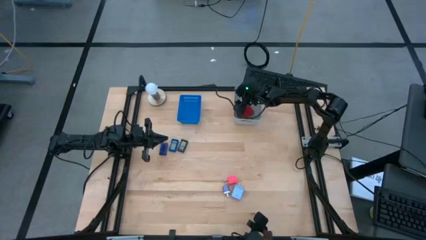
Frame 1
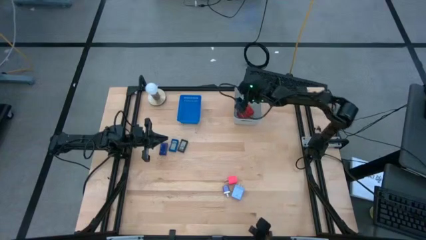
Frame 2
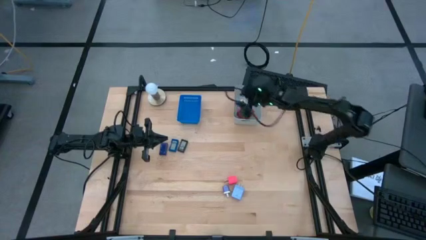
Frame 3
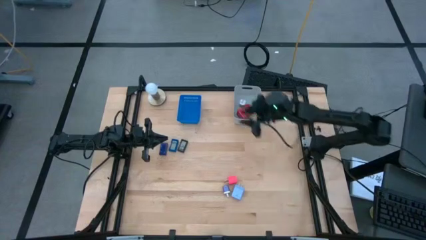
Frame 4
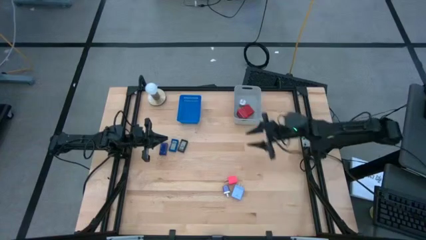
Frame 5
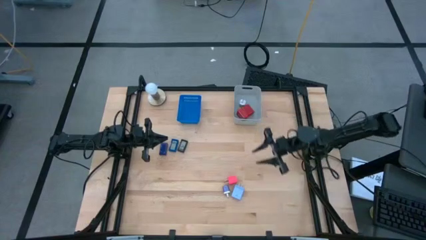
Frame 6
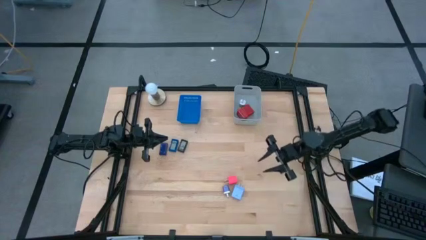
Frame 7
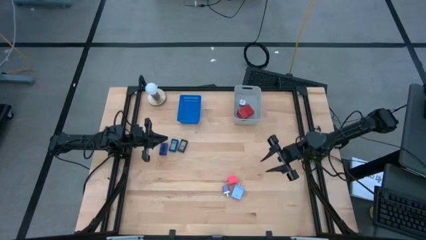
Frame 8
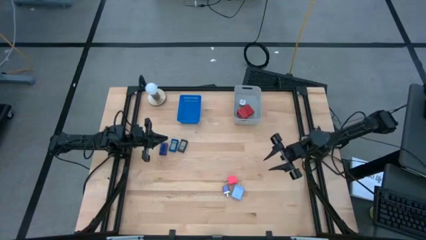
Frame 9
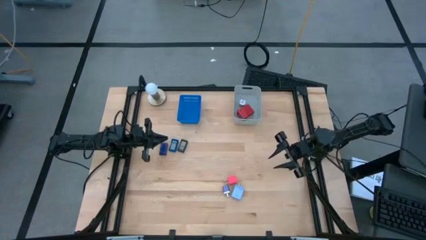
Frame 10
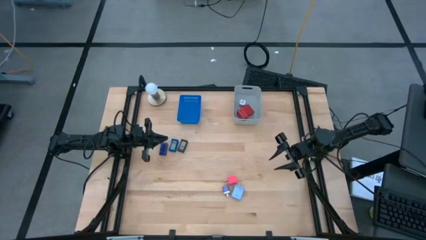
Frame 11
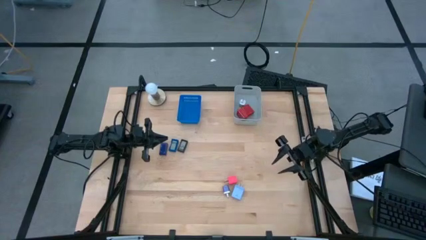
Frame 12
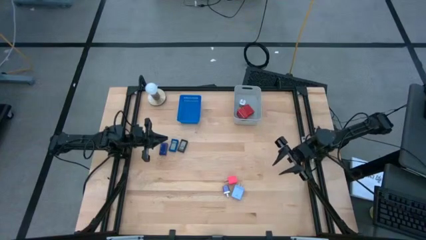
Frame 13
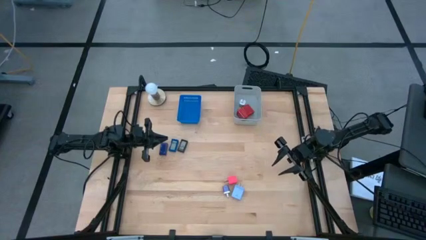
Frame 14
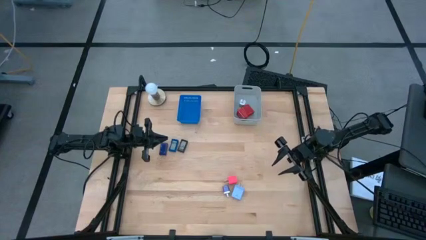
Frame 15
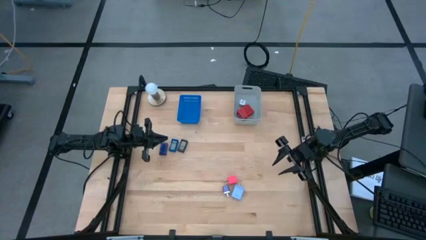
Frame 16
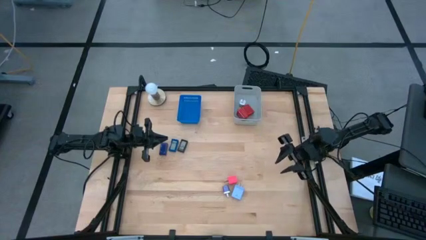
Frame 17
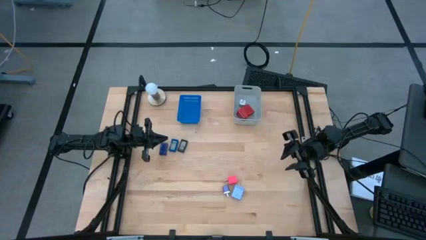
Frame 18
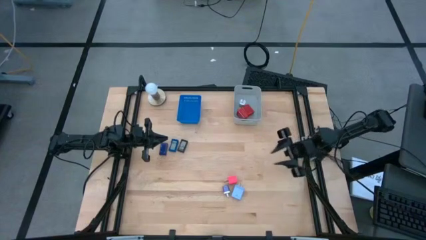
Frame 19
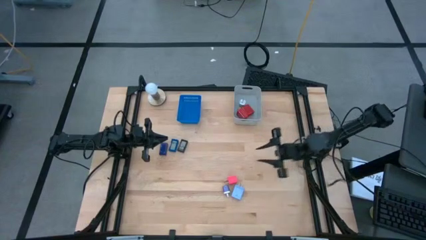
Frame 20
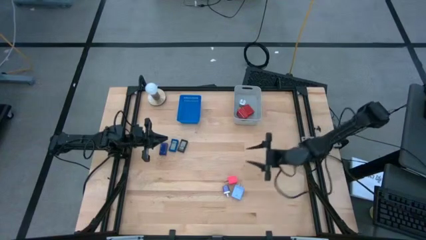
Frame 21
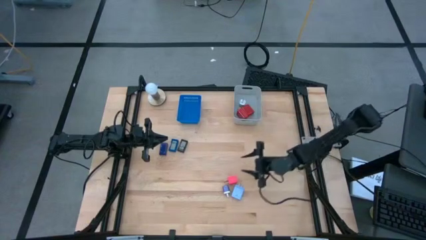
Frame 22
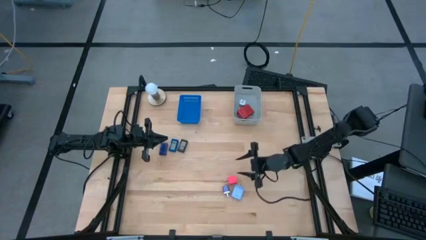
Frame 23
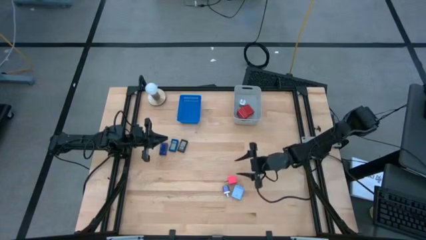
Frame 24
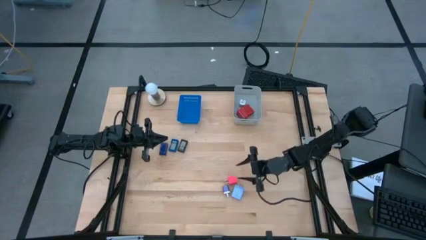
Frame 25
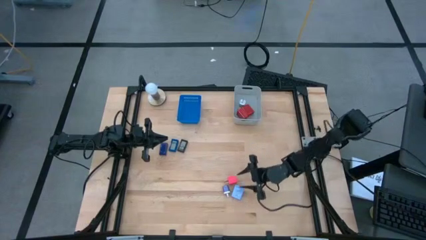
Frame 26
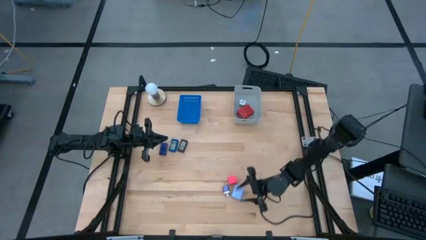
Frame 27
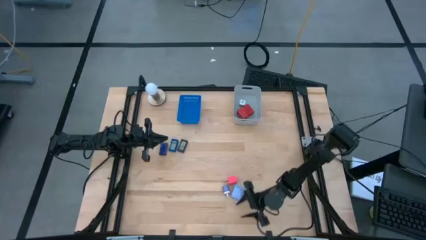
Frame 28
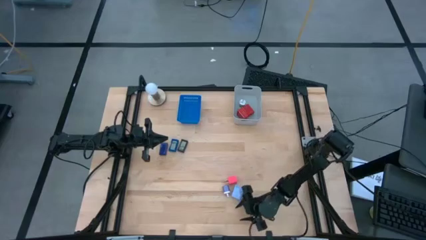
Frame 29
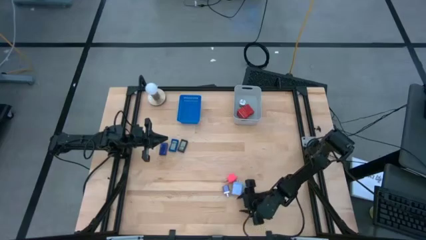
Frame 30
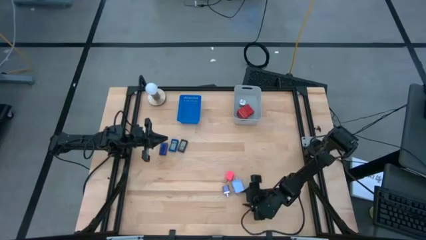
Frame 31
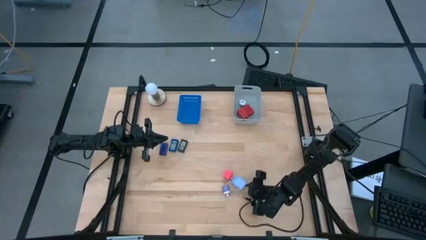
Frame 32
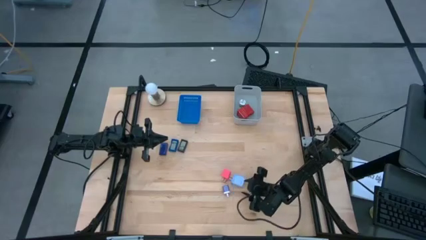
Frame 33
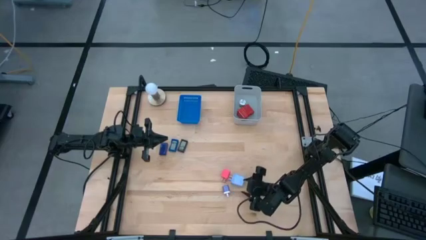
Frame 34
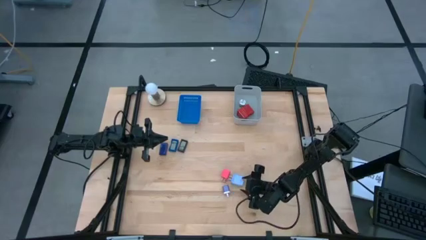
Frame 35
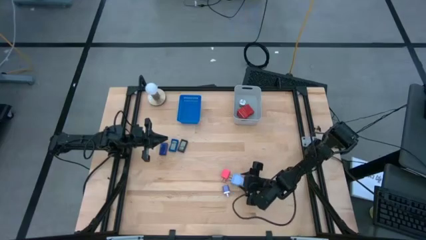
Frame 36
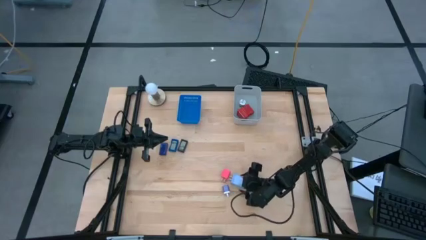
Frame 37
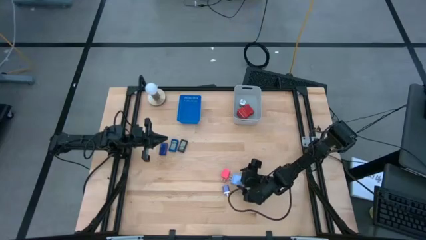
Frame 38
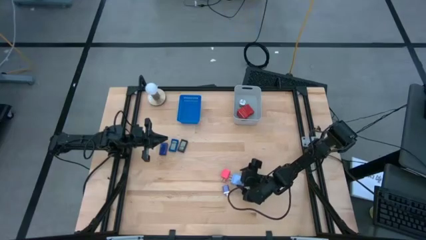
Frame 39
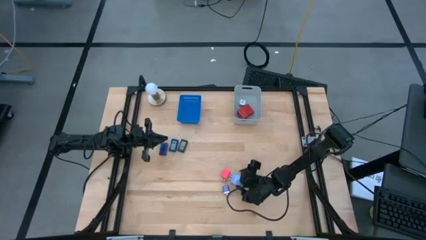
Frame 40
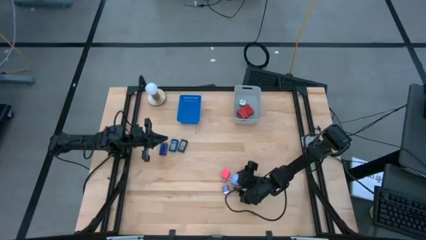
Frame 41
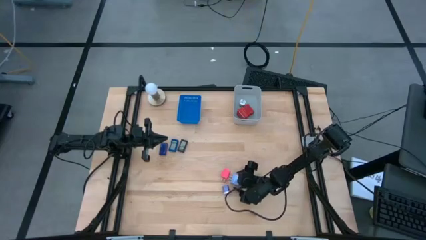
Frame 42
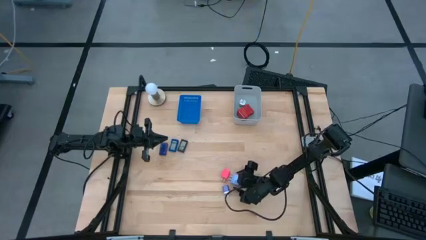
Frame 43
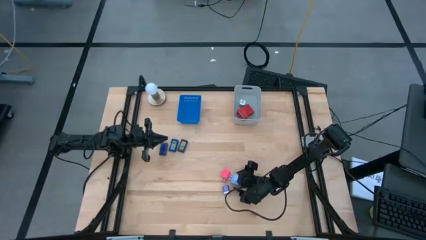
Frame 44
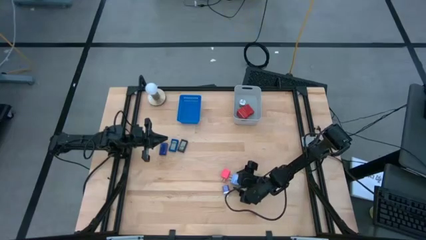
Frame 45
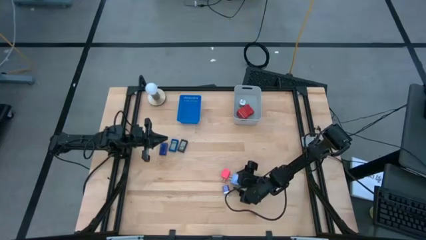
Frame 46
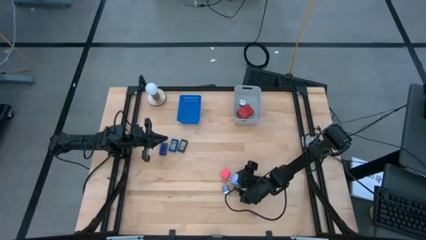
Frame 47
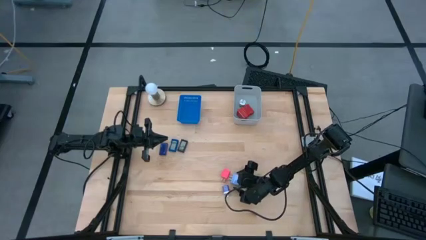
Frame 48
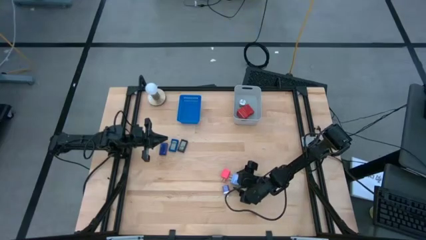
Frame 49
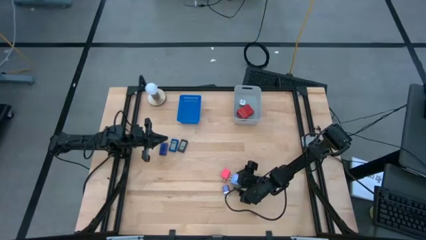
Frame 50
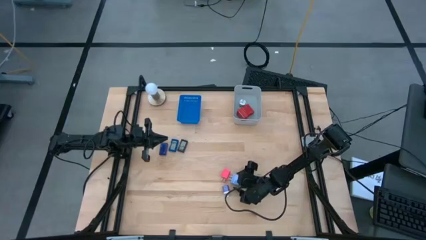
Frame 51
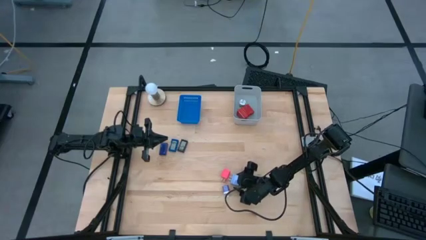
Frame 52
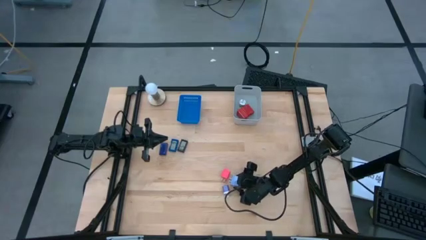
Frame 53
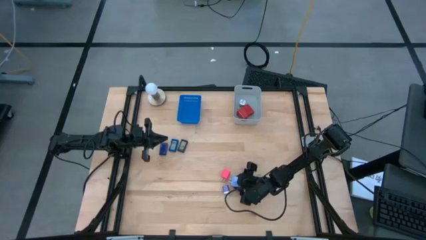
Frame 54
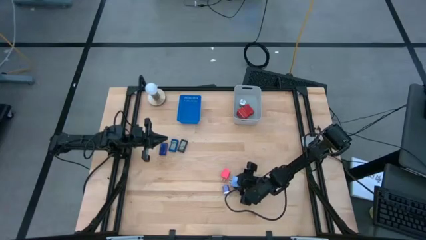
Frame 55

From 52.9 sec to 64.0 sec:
Task: Pick & Place Office items
Put the blue charger adapter into the gray bin
